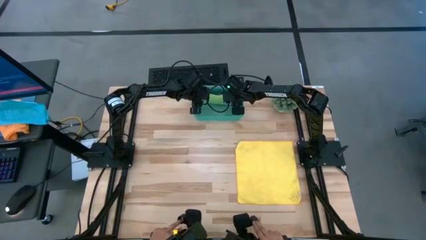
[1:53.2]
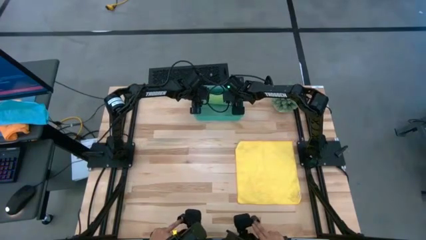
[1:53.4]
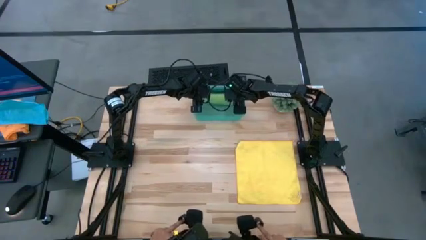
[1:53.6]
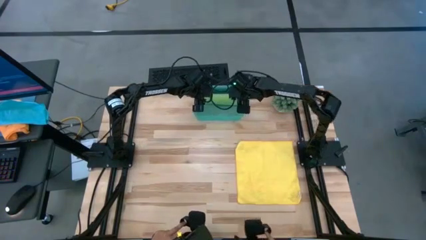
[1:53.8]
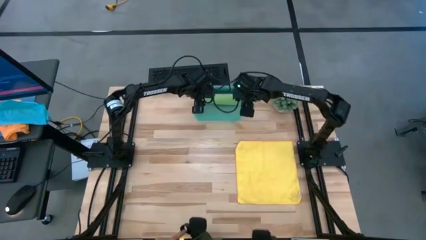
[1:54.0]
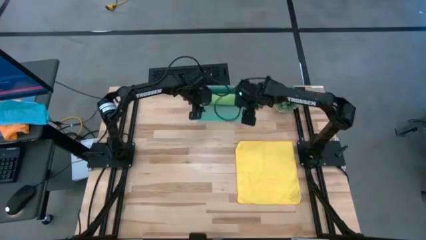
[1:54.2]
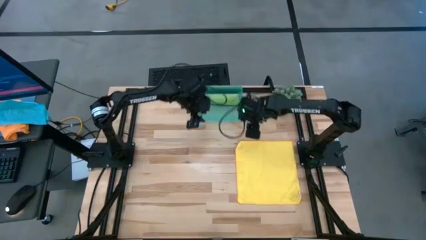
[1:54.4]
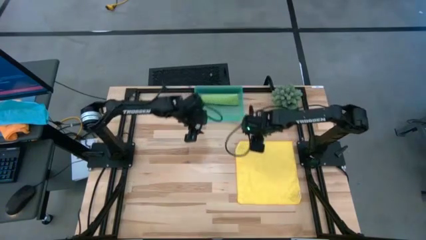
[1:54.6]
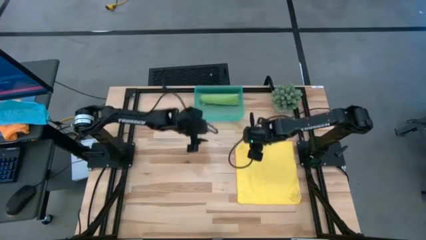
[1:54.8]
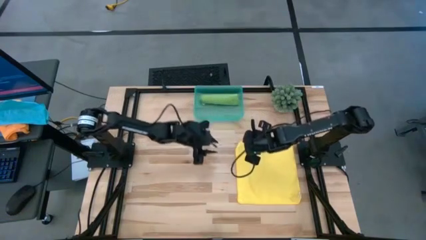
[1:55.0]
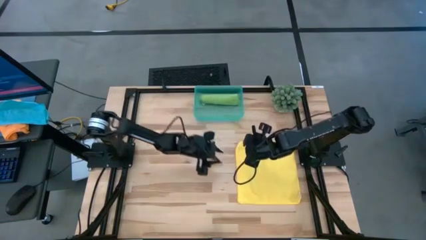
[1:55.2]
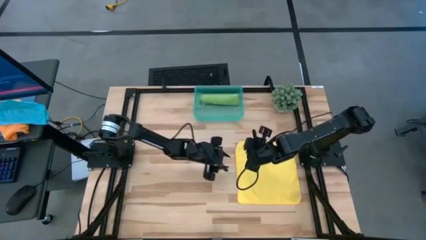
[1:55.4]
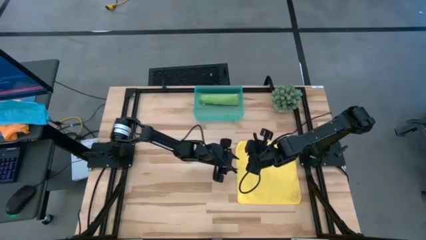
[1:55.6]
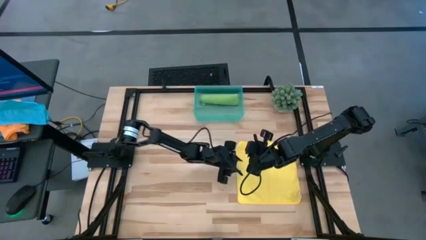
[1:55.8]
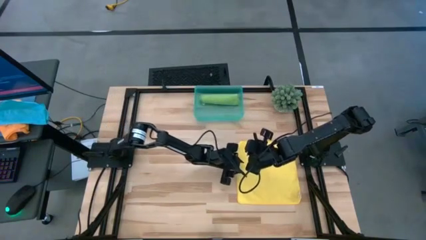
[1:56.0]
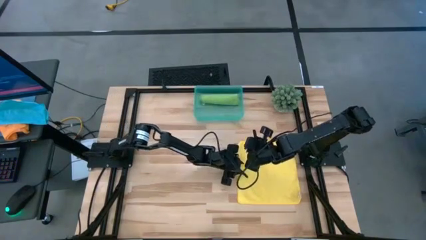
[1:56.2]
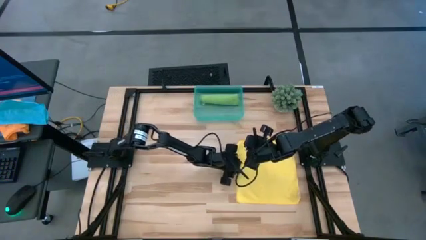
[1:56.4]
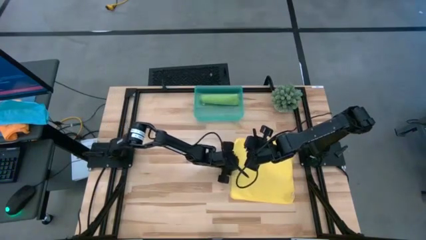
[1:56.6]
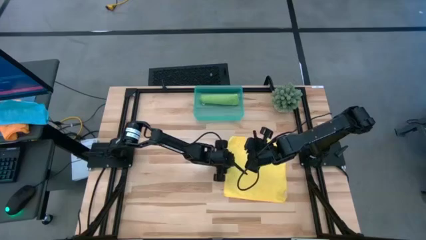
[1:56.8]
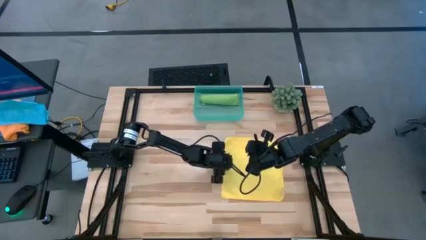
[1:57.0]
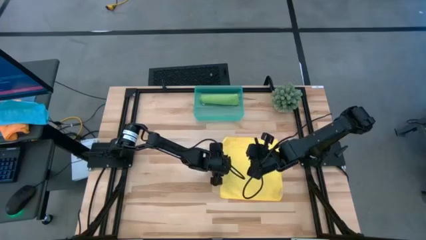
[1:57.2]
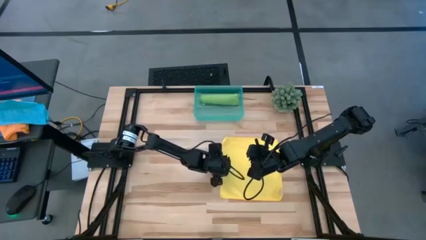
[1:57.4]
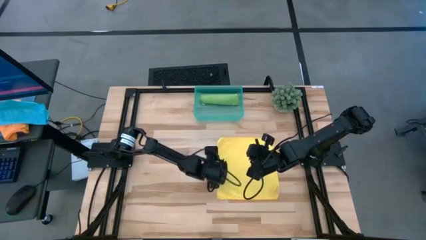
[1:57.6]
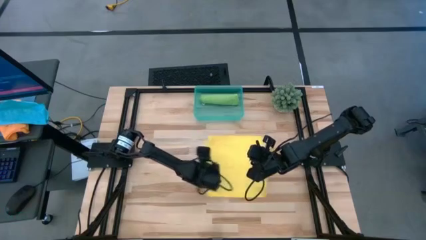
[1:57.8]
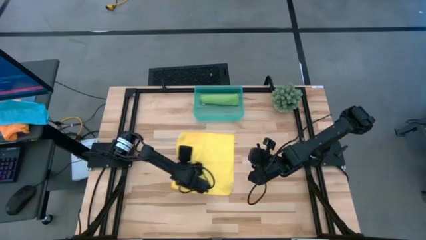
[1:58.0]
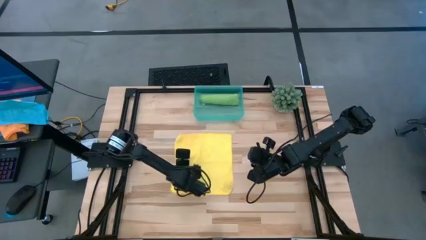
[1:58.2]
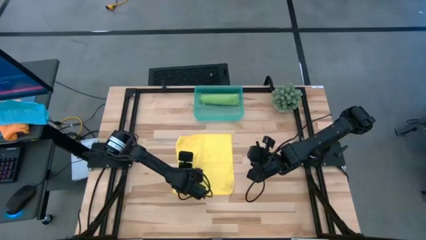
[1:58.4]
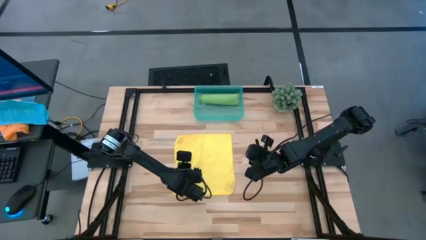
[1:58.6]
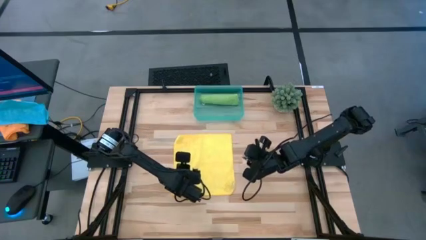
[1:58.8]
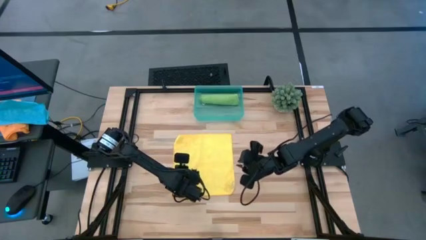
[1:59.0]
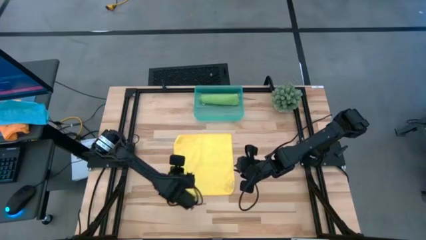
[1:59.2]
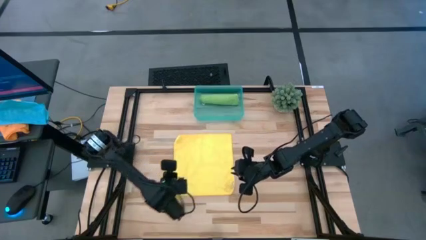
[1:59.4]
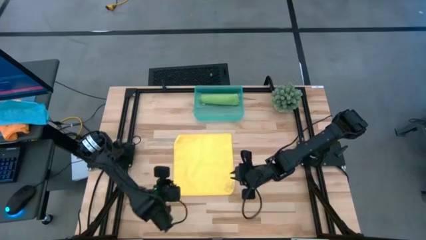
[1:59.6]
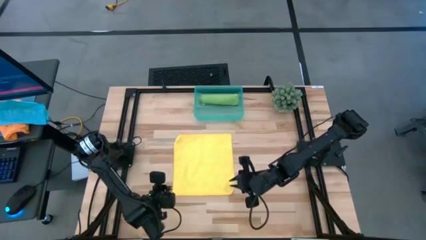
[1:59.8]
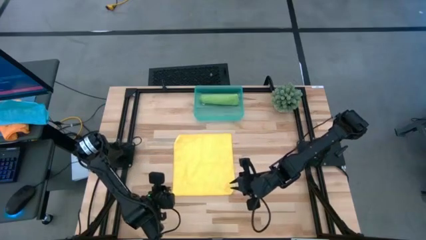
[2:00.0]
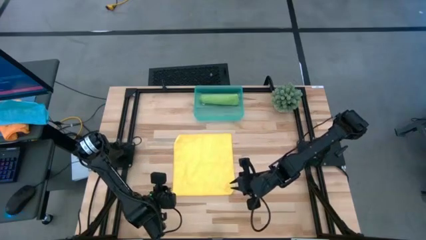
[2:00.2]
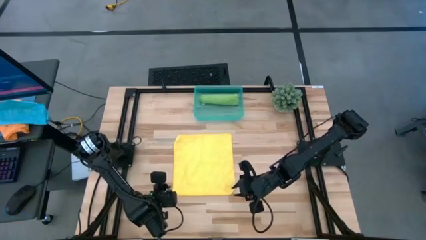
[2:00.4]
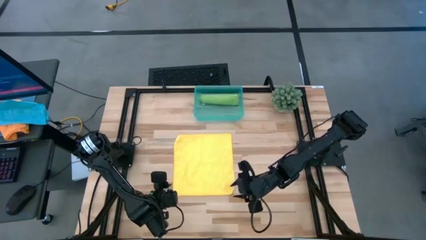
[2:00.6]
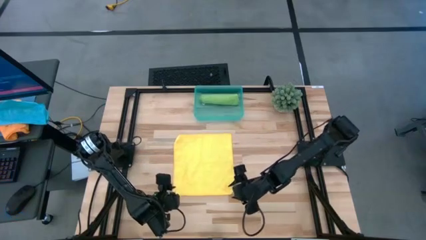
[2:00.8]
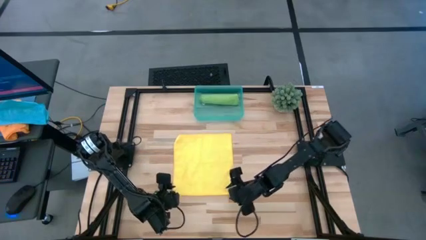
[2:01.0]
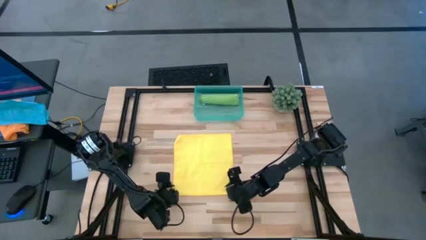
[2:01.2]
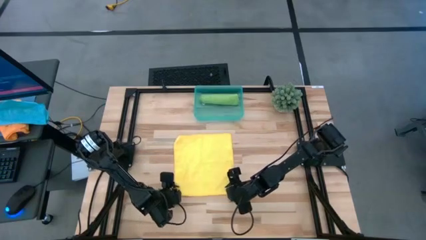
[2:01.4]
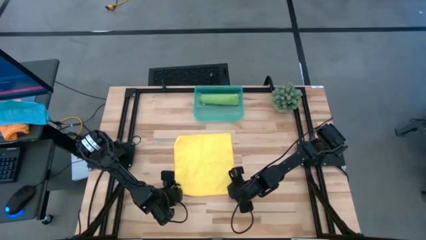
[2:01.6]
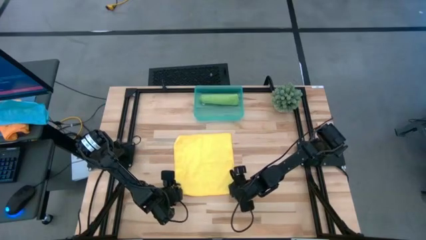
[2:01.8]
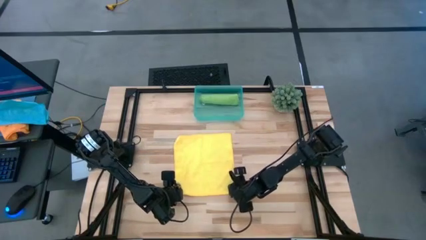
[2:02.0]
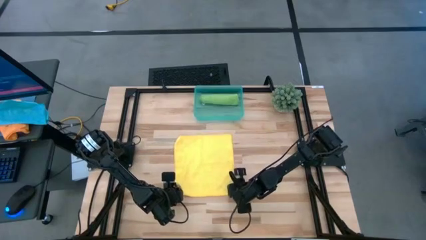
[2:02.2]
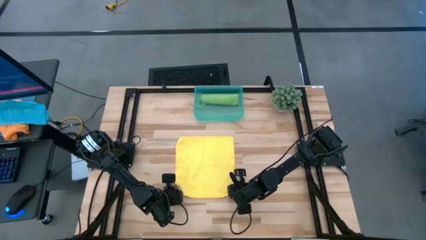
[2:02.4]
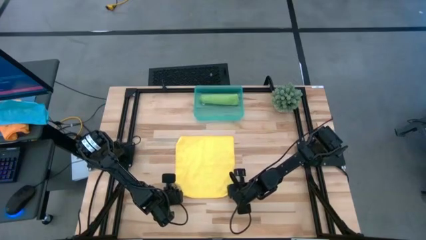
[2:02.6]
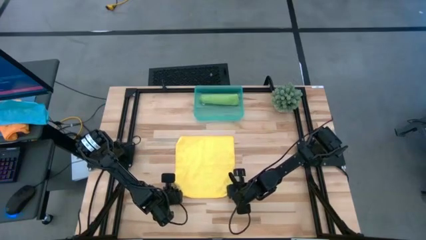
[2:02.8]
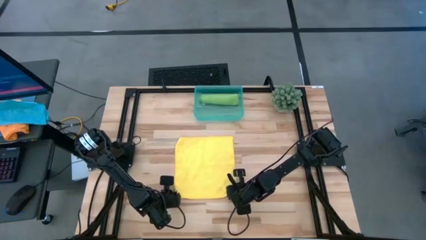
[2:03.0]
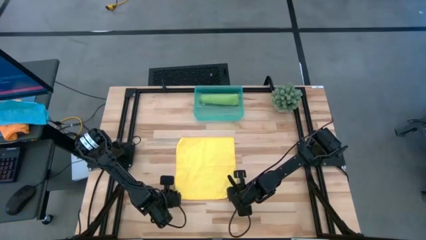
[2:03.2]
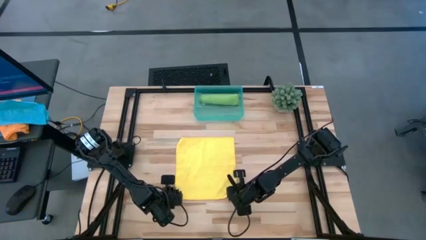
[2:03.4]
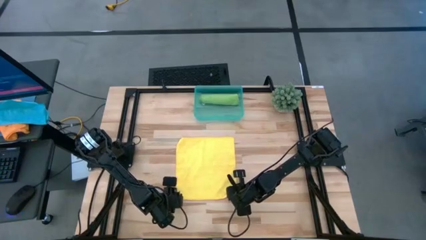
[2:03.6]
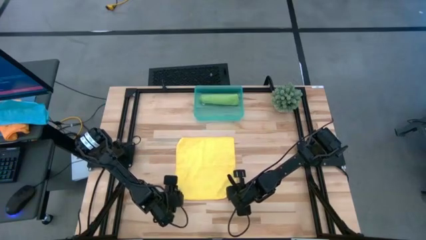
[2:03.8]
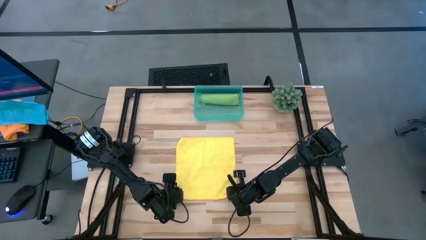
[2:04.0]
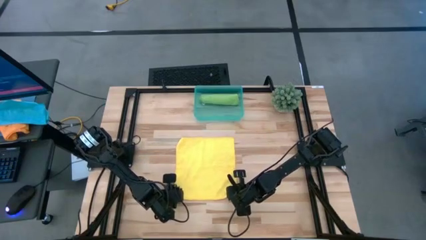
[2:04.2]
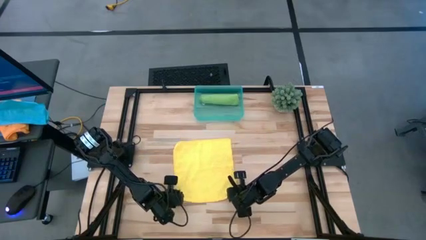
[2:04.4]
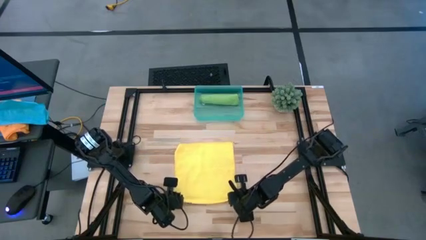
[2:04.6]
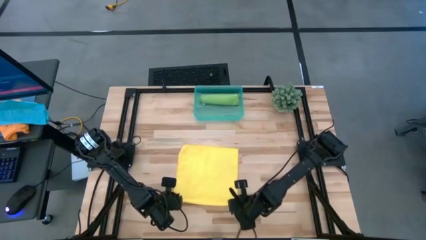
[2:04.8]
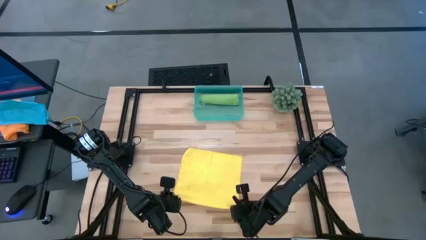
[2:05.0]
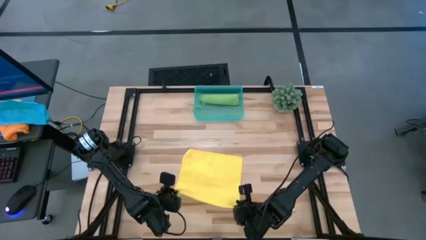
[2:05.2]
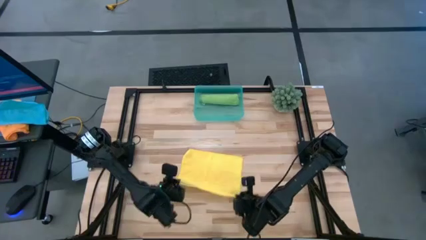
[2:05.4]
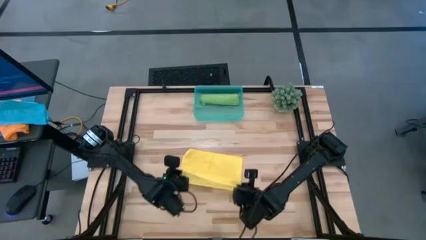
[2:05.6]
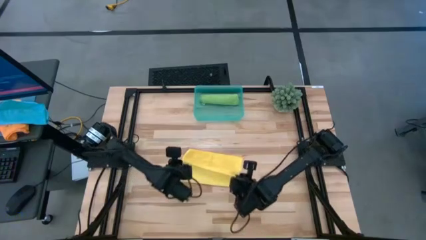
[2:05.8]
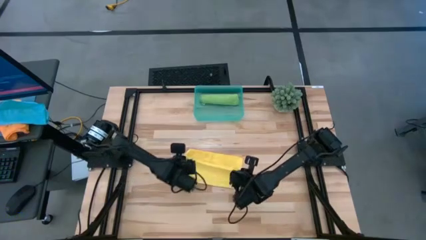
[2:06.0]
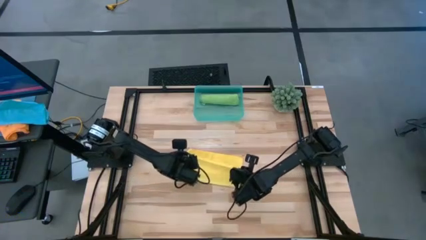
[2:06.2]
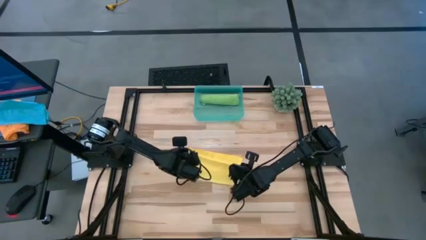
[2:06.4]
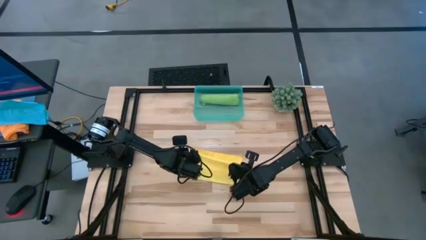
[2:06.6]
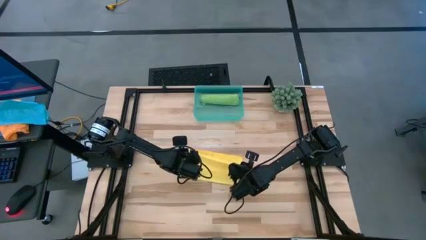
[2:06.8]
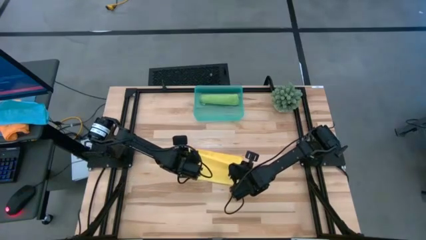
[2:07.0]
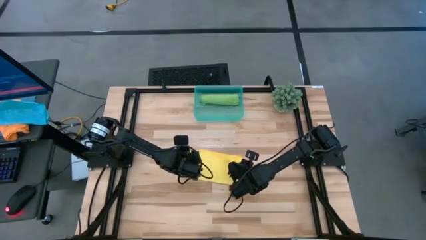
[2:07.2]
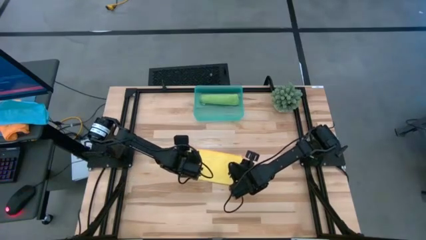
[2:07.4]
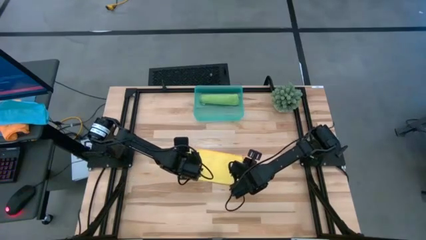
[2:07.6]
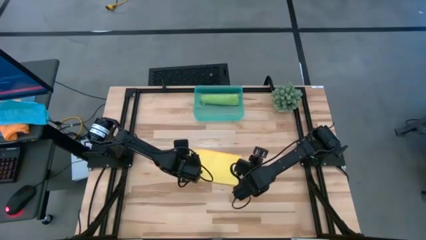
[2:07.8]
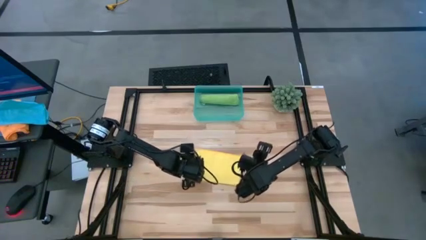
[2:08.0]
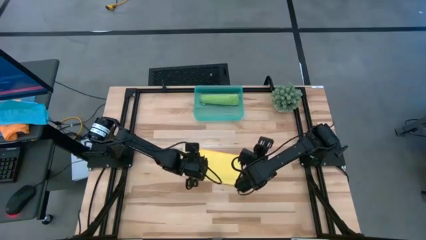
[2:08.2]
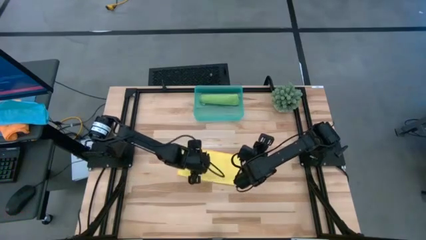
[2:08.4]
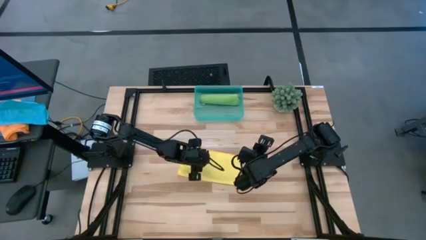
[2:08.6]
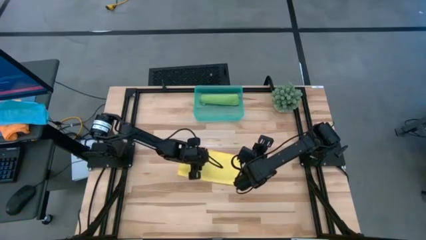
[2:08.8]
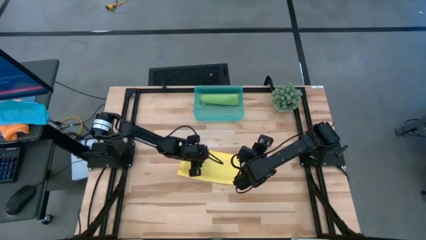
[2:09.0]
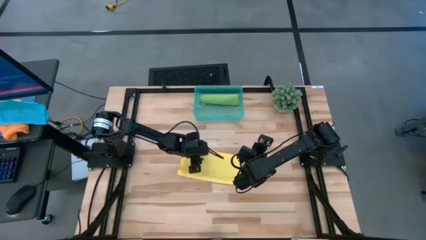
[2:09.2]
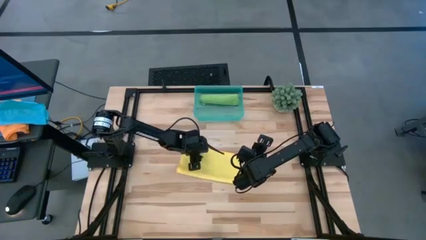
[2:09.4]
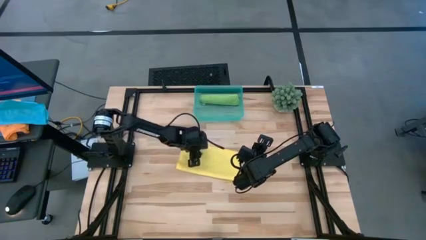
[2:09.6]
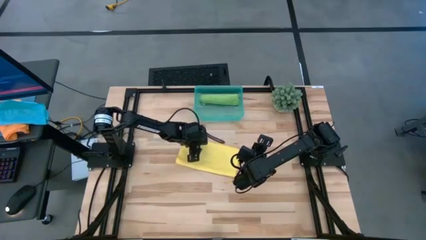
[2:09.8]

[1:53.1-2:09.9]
Task: Roll microfiber towels into tight, uniform cylinder then place into a basket
Fold the yellow towel
